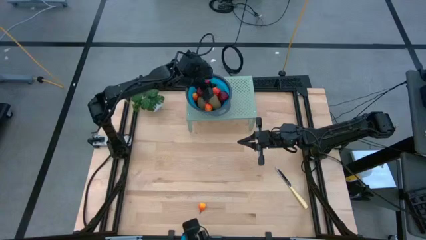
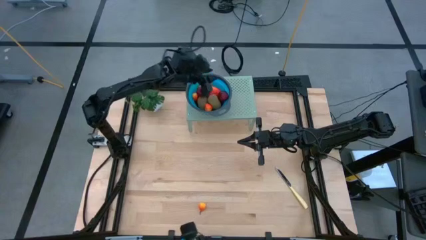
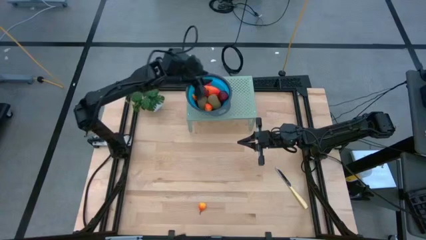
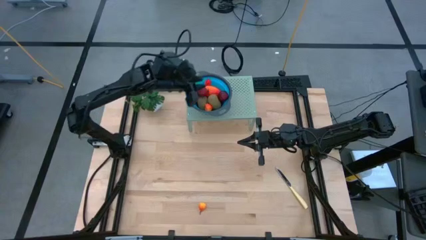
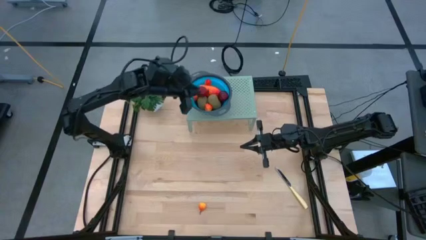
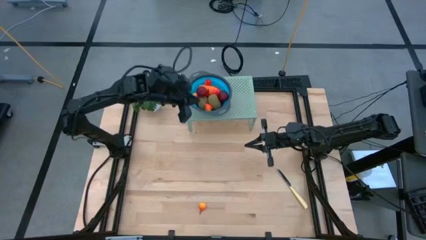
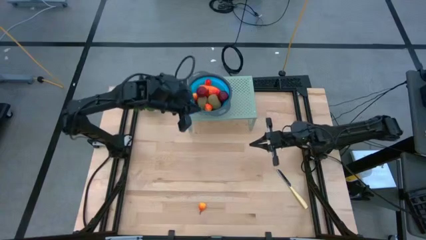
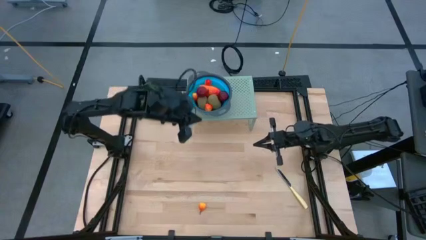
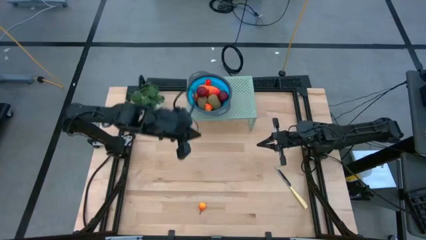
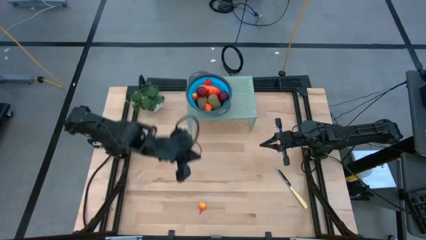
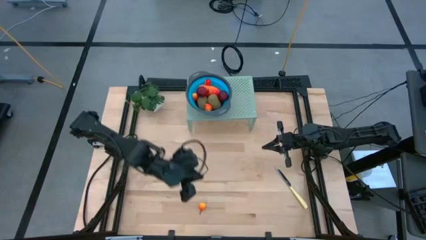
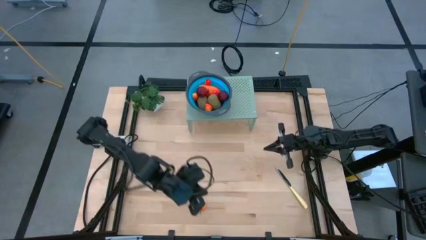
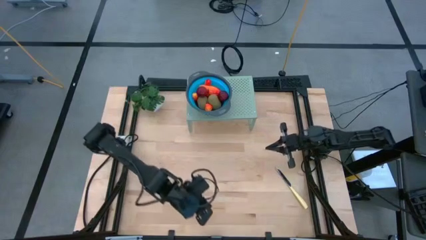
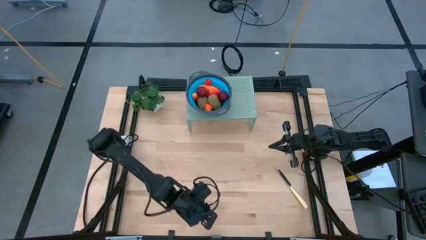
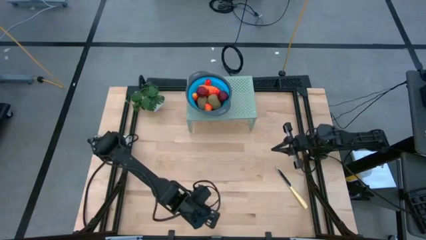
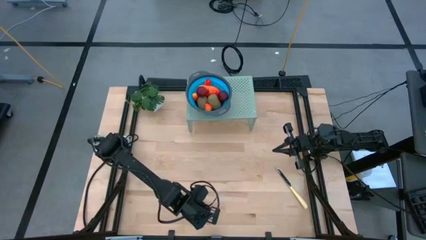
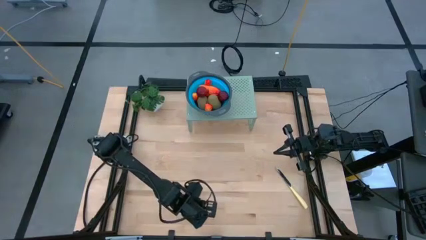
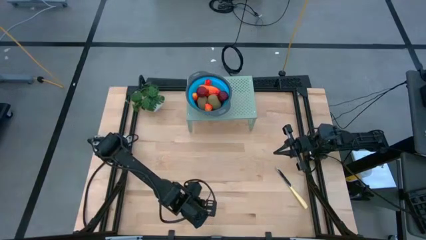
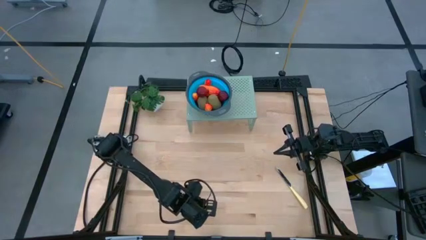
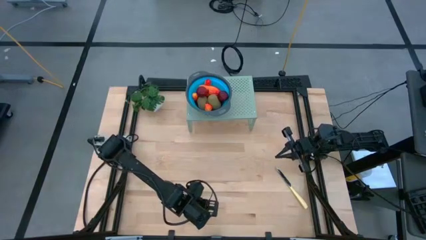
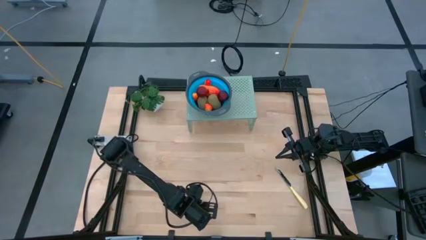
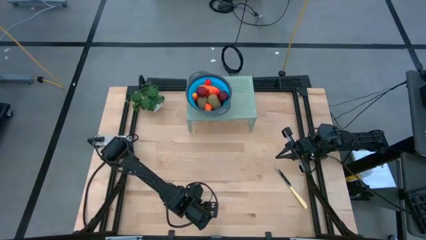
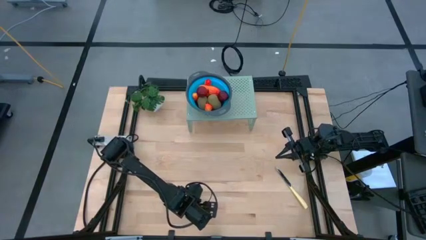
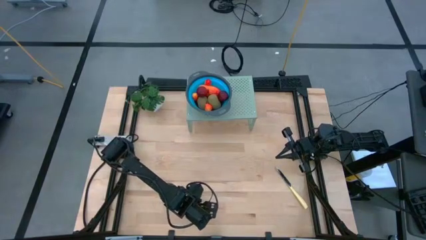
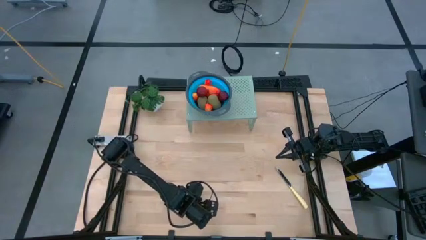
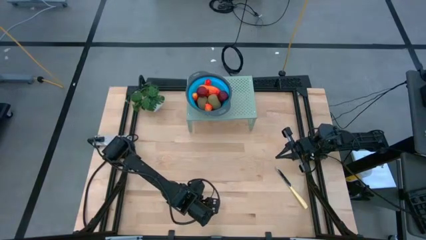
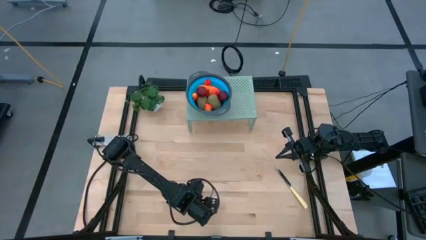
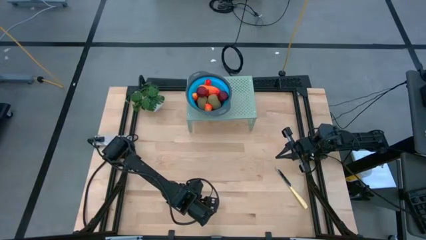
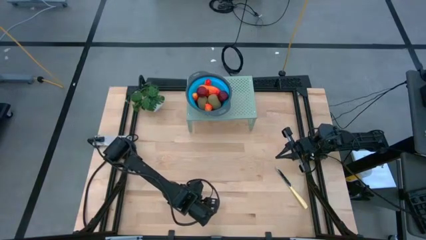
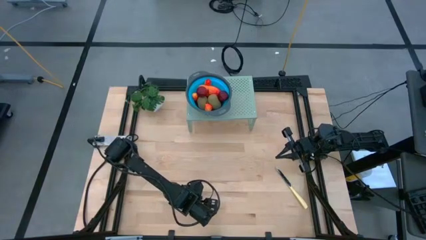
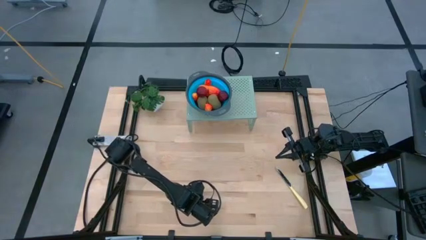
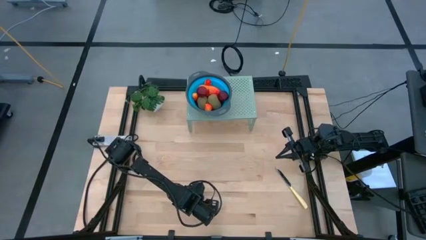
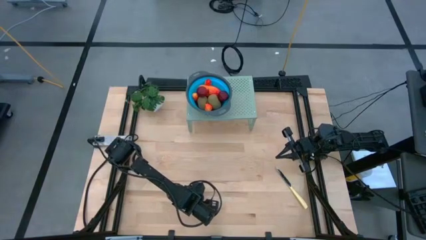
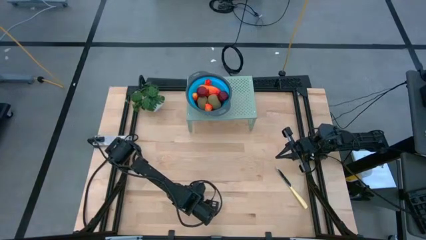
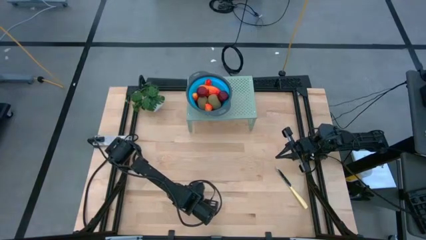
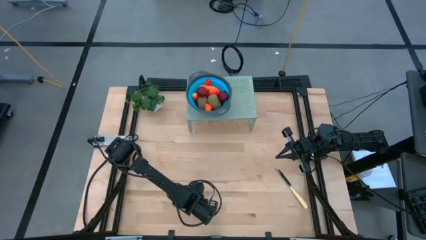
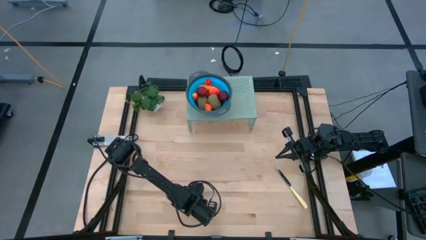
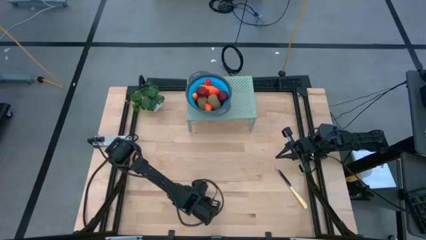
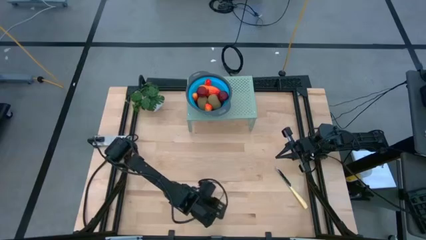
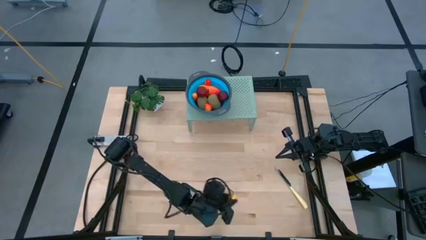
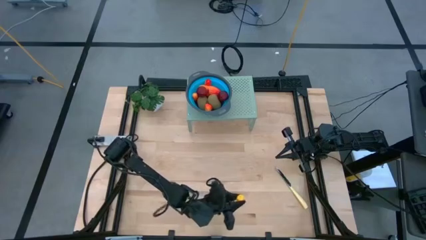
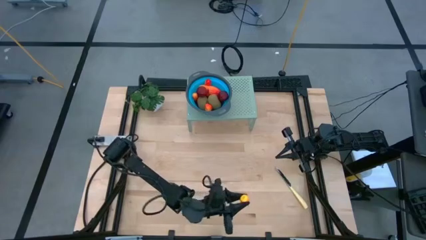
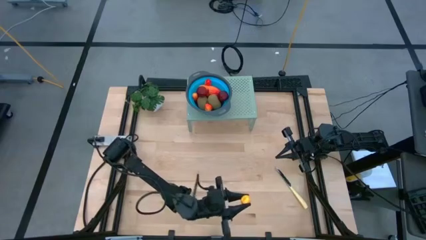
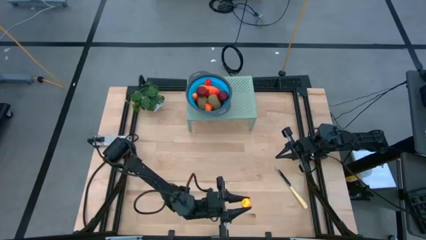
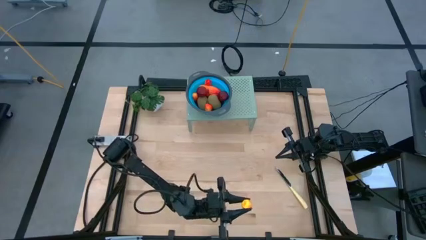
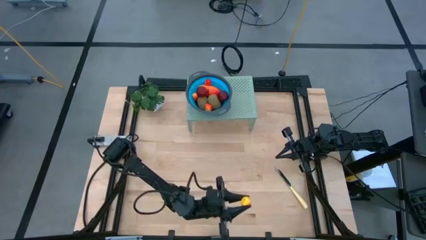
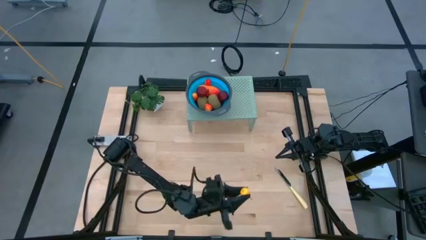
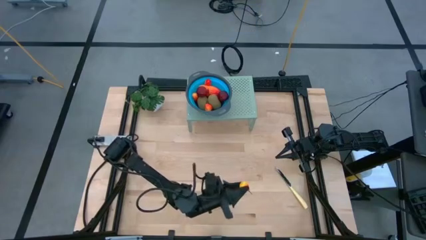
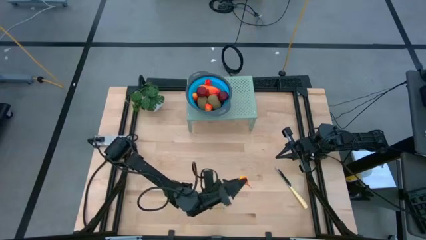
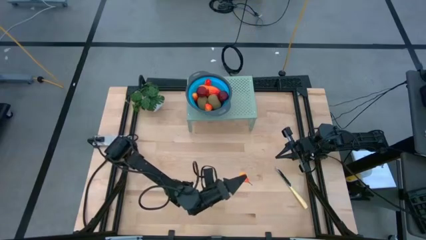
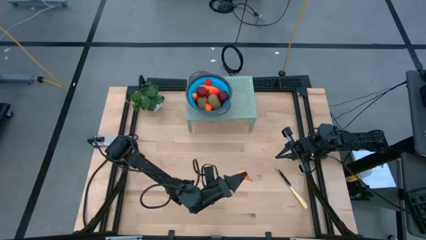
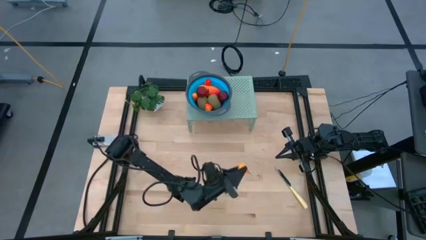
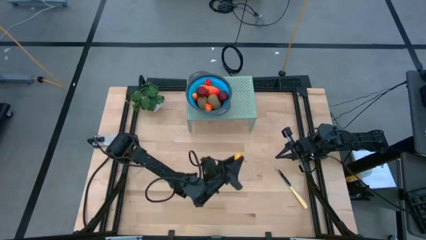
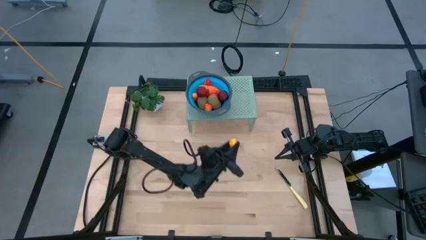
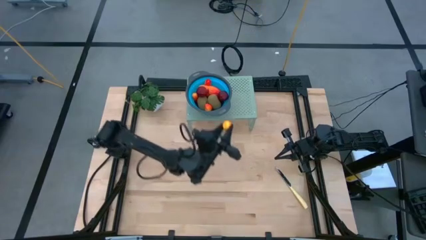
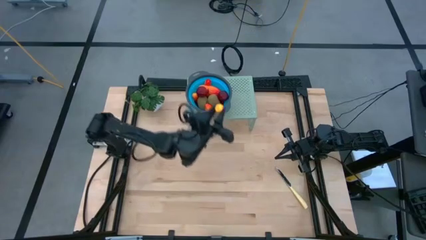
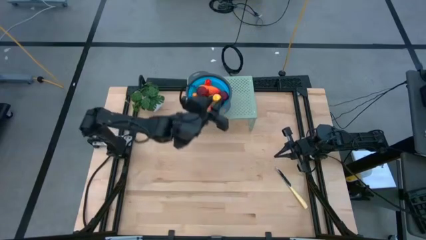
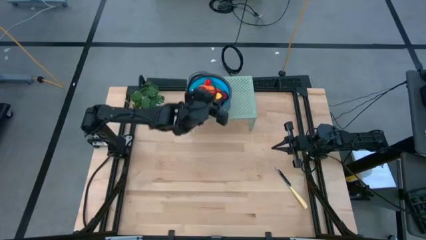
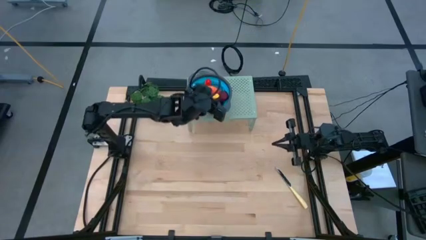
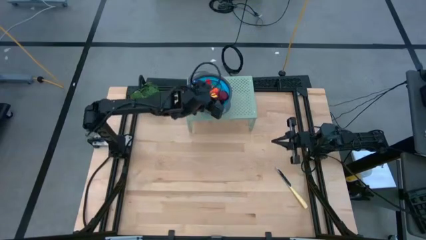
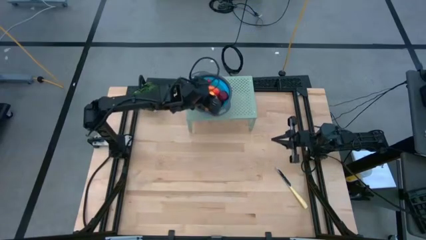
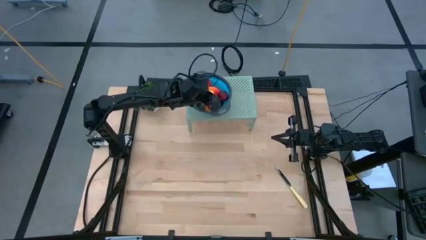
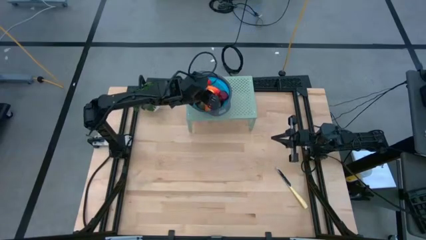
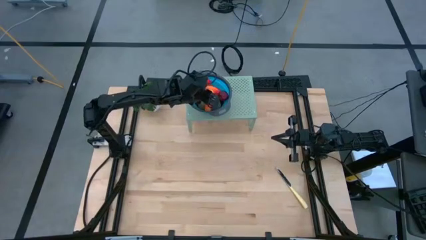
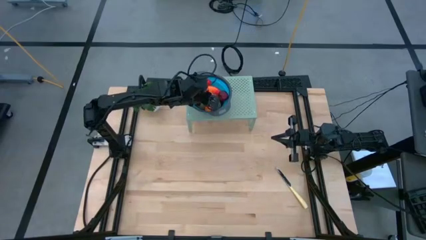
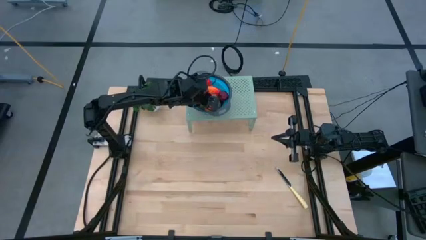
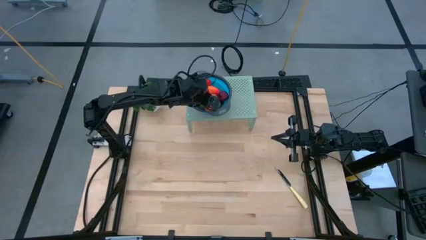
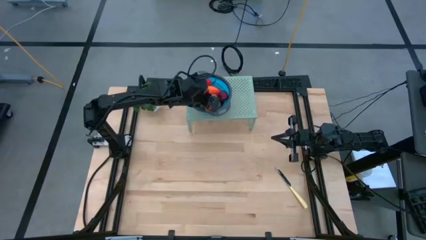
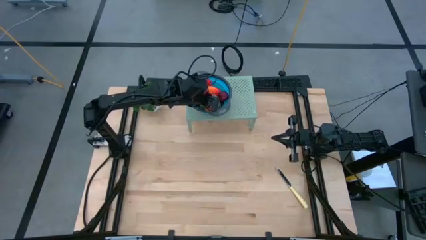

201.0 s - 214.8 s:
Task: Pick & Place Fruit
Put the orange pear into the blue bowl on the shelf

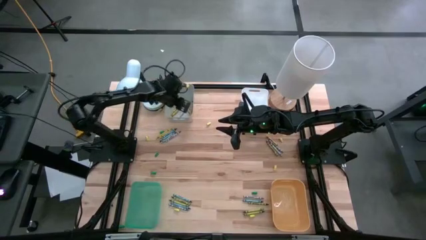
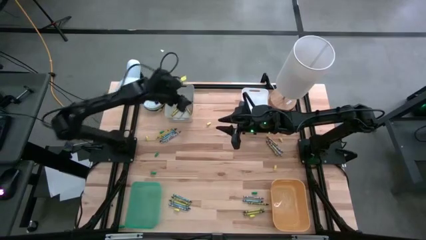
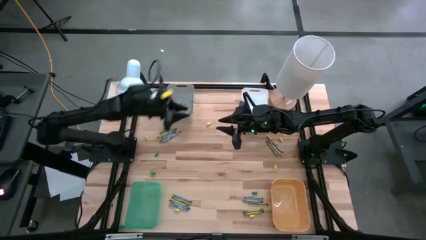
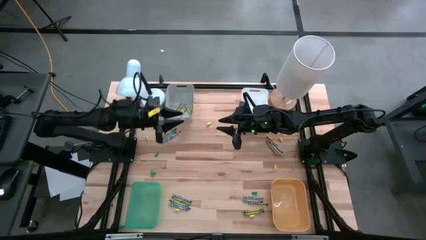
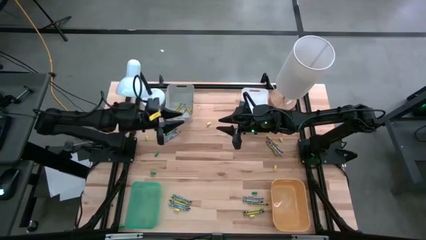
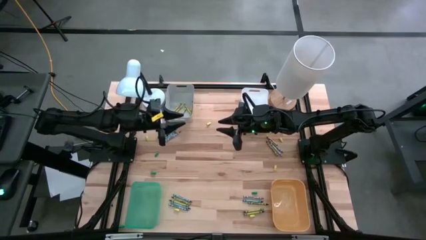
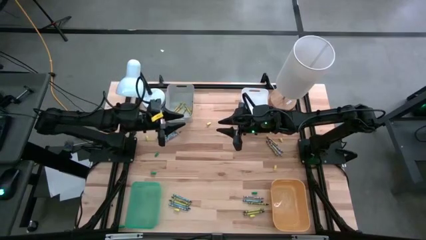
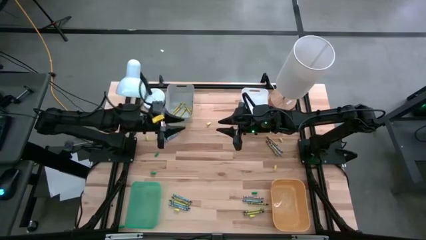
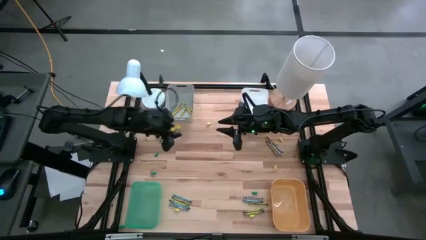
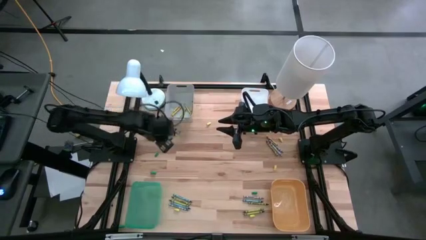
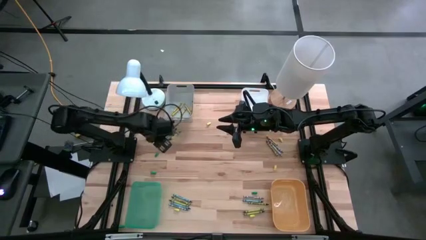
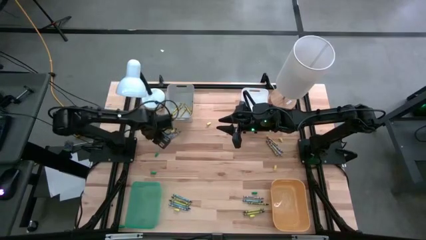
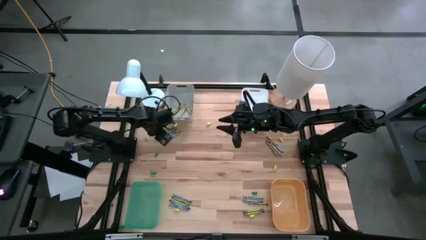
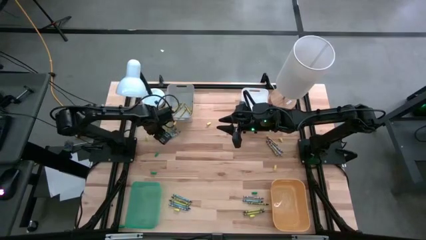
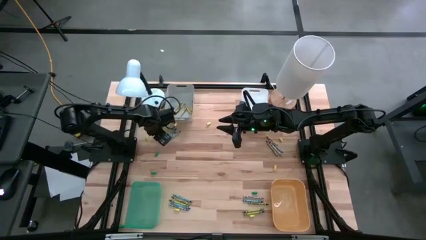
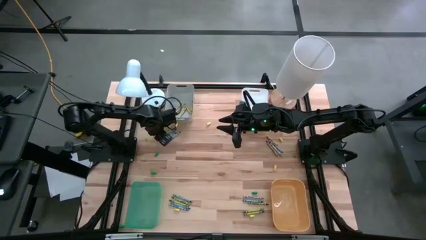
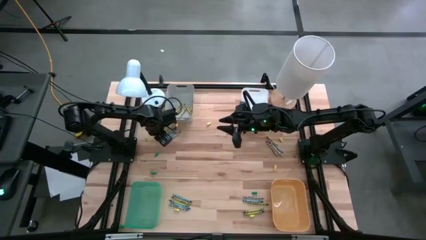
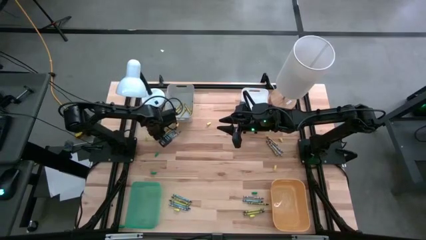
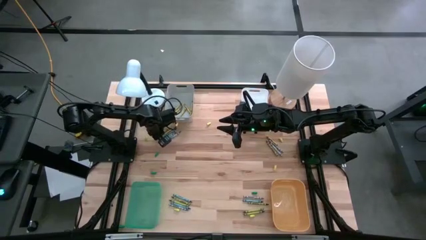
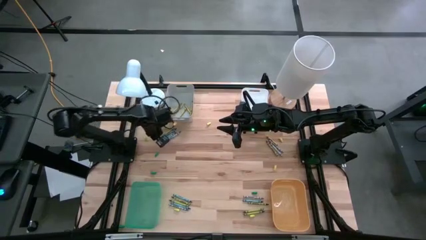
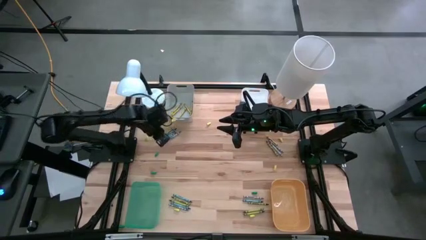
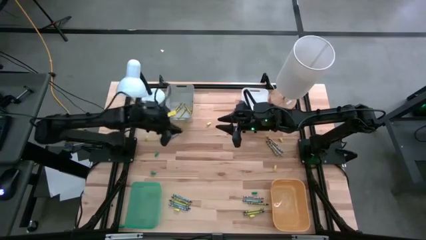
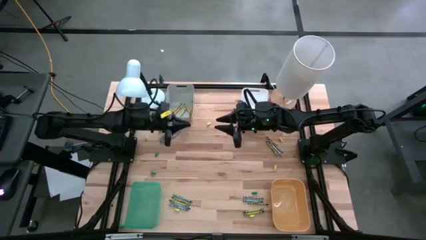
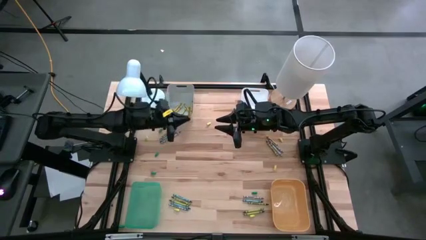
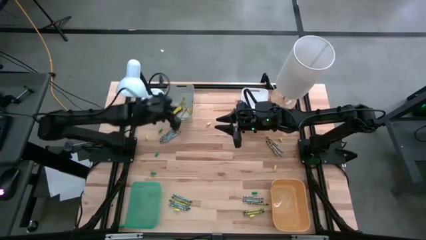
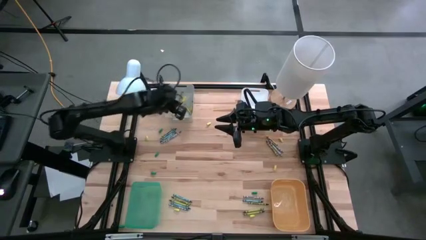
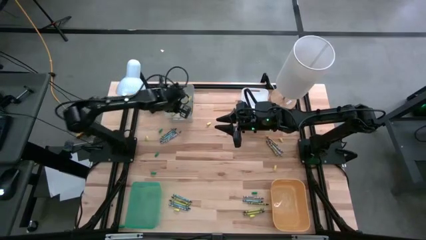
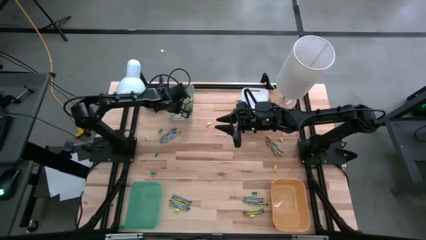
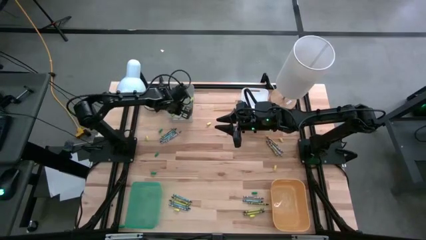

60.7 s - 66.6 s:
Task: Sort crayons
Put the yellow crayon into the gray bin
